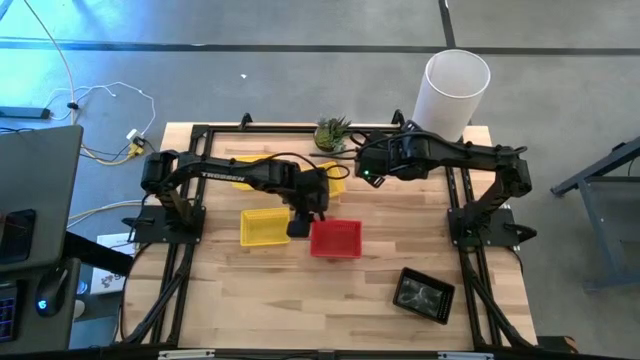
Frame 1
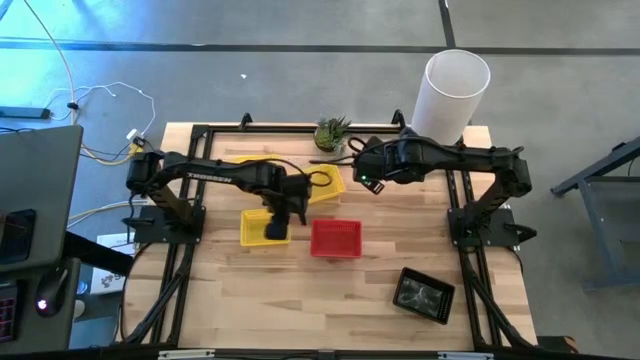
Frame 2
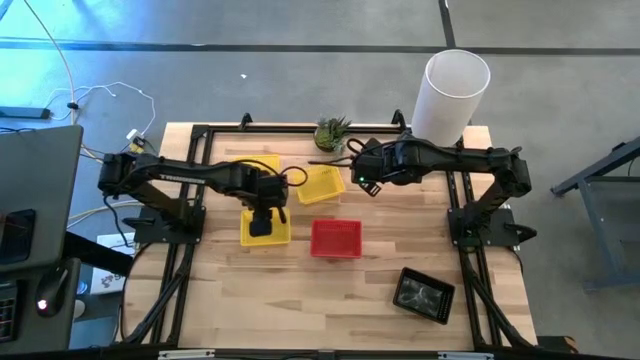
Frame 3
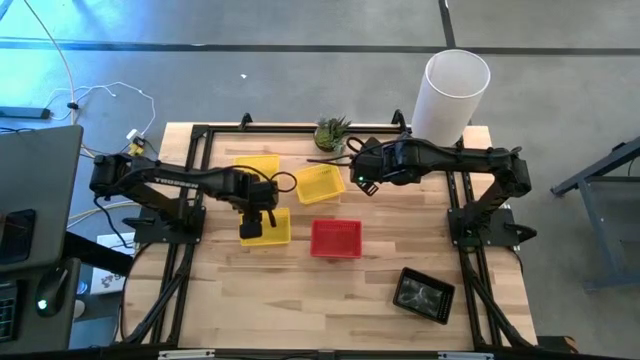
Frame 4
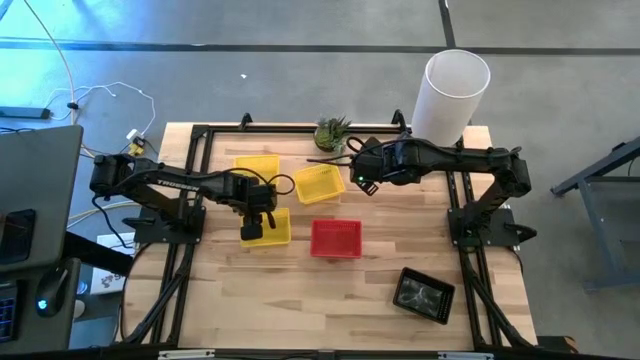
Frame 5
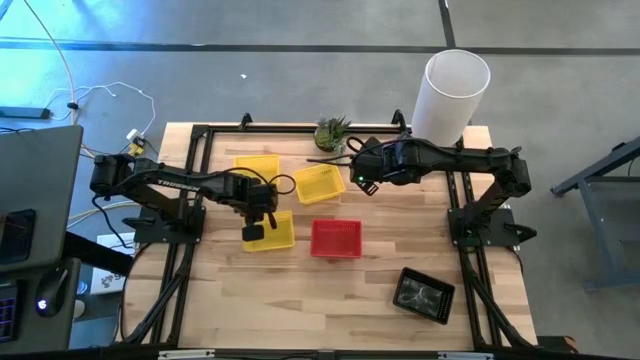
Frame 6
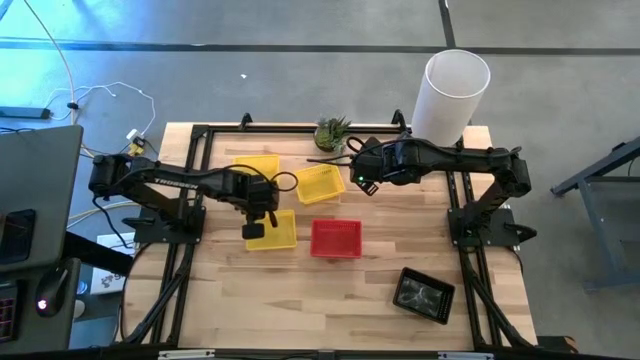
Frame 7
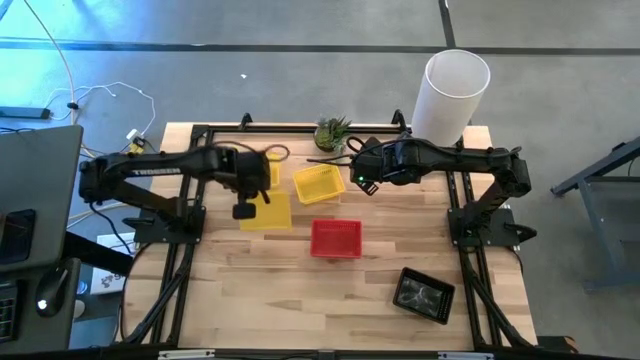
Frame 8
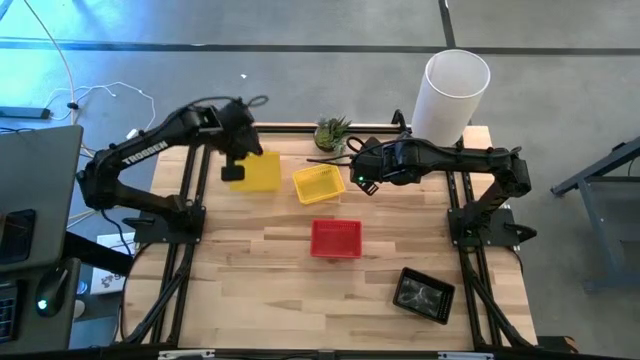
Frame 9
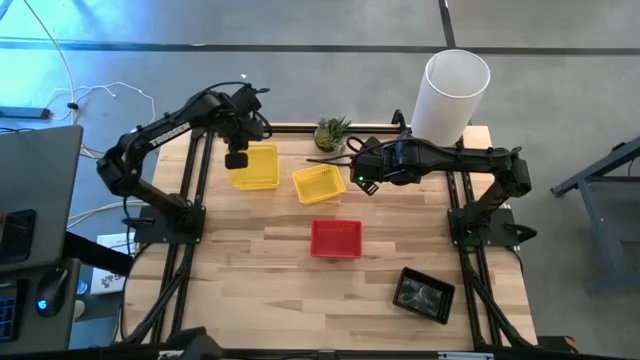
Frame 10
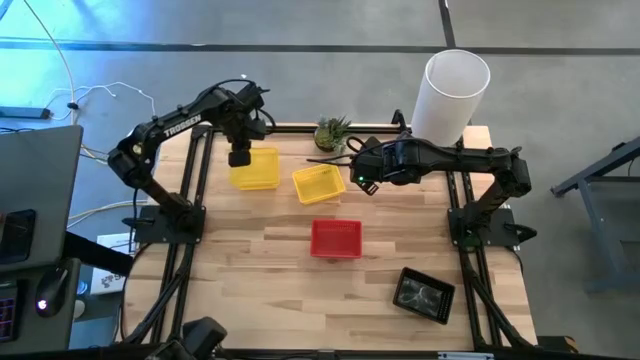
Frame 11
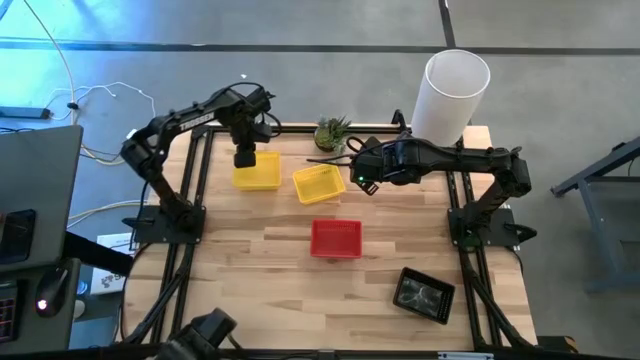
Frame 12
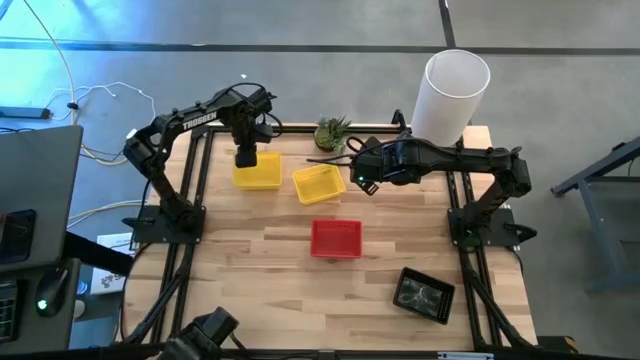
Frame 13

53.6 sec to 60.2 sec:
Stack the bottom yellow bin on top of the top left yellow bin

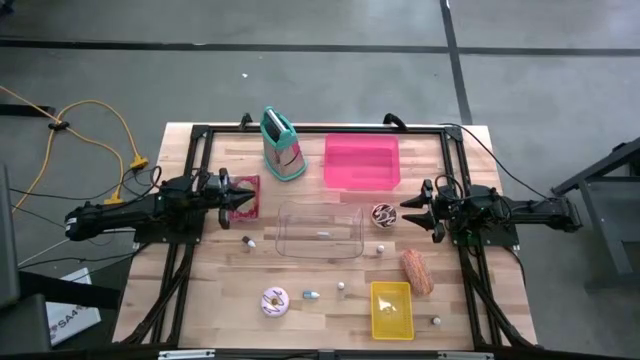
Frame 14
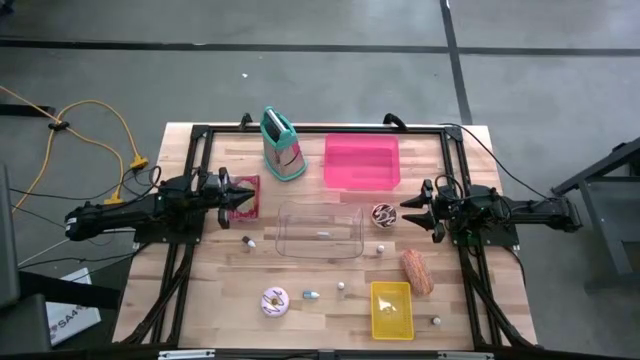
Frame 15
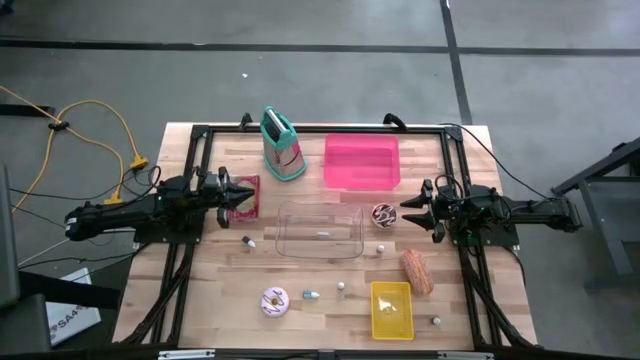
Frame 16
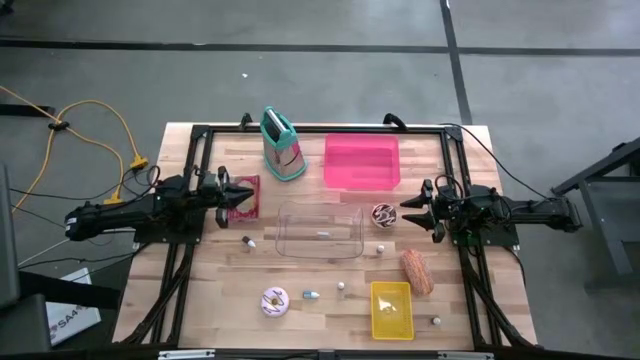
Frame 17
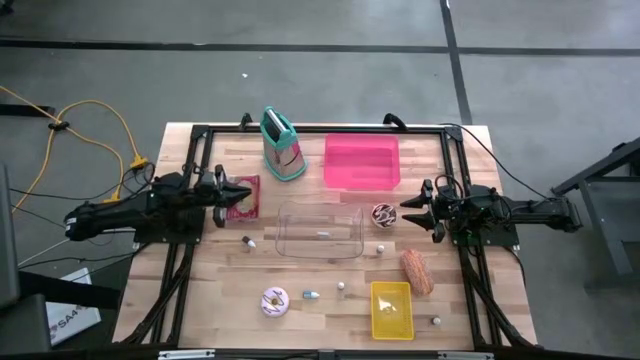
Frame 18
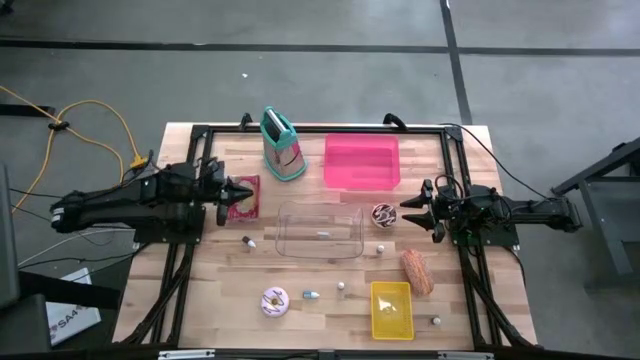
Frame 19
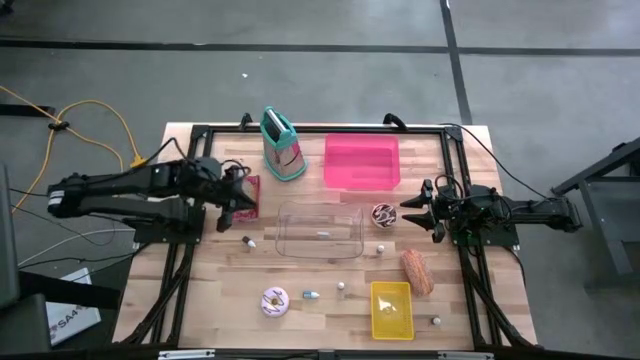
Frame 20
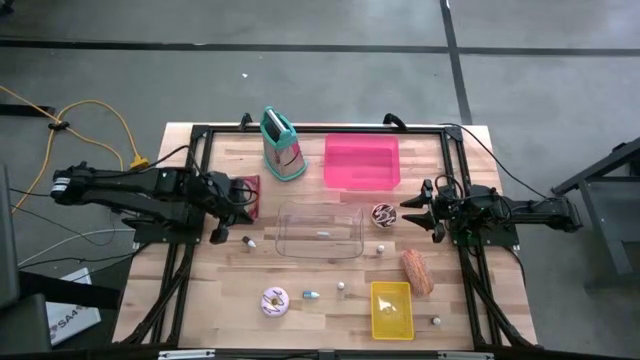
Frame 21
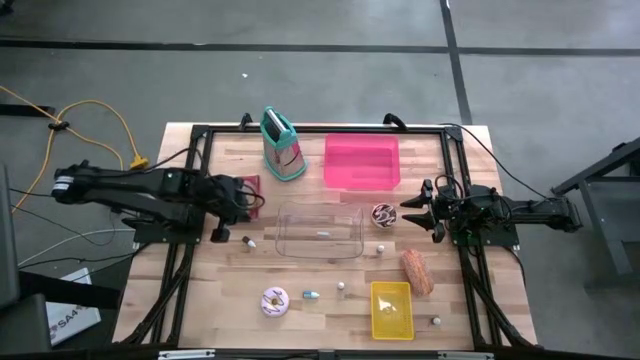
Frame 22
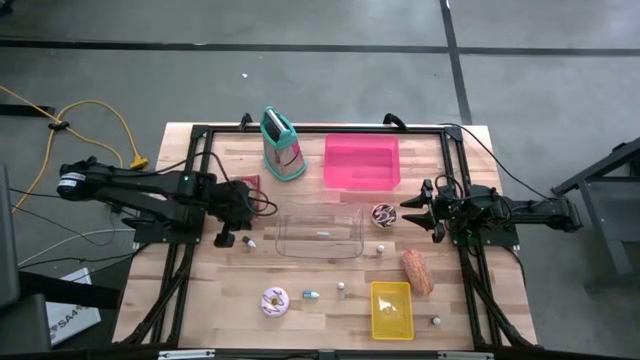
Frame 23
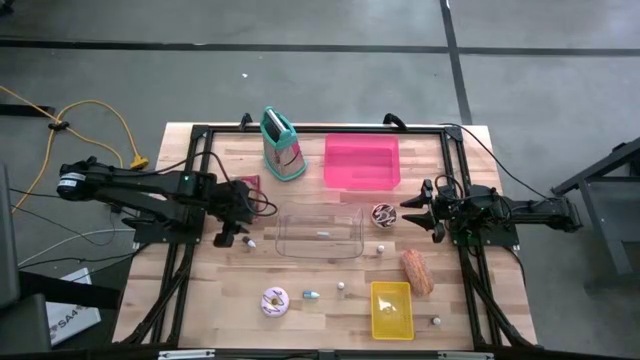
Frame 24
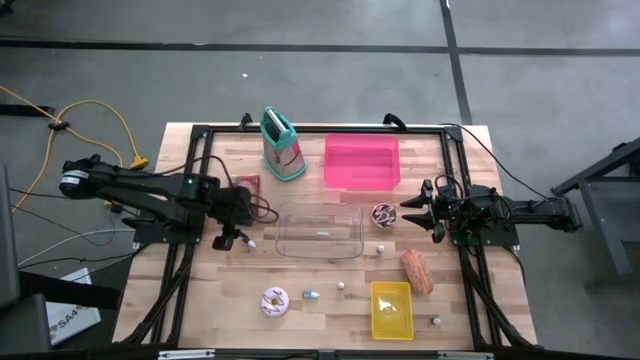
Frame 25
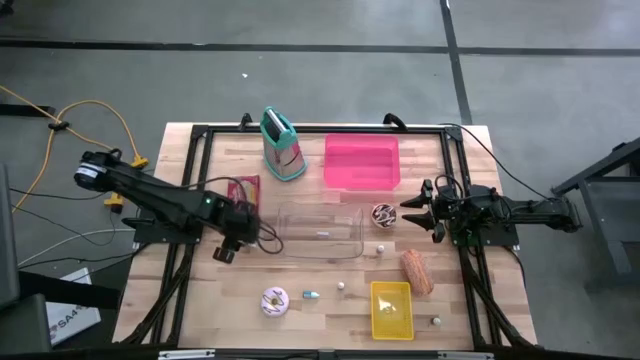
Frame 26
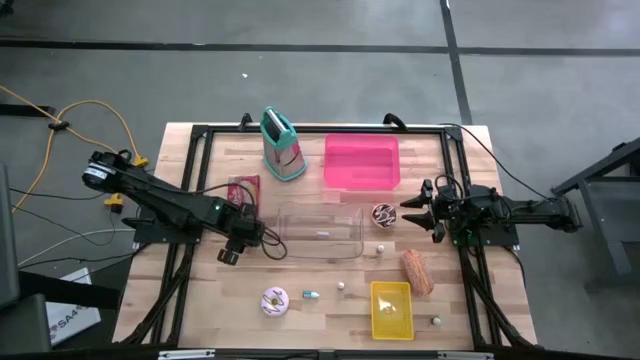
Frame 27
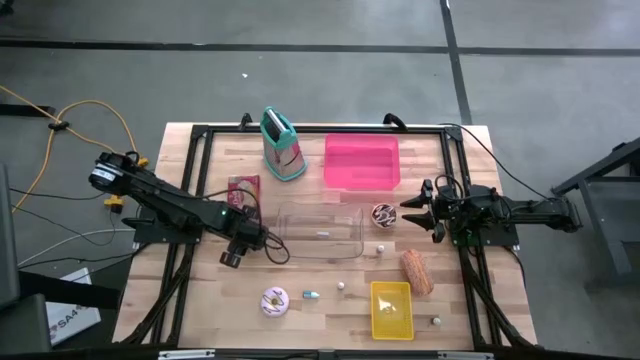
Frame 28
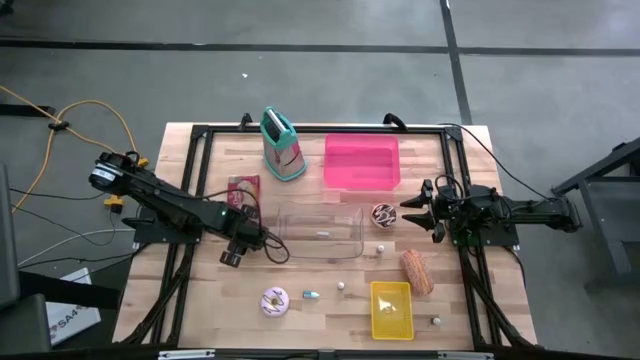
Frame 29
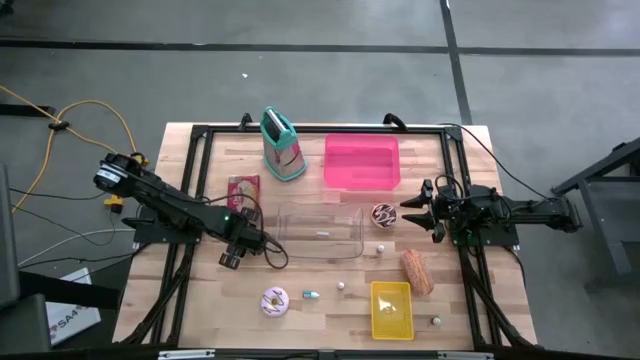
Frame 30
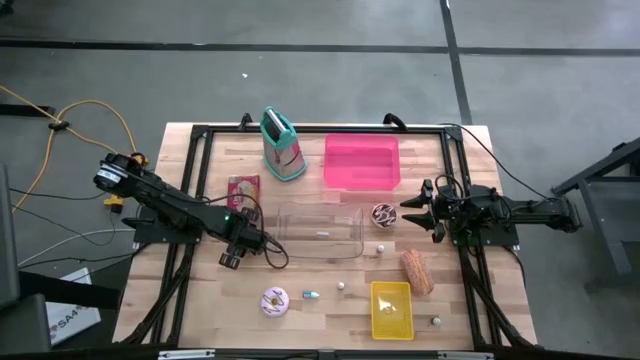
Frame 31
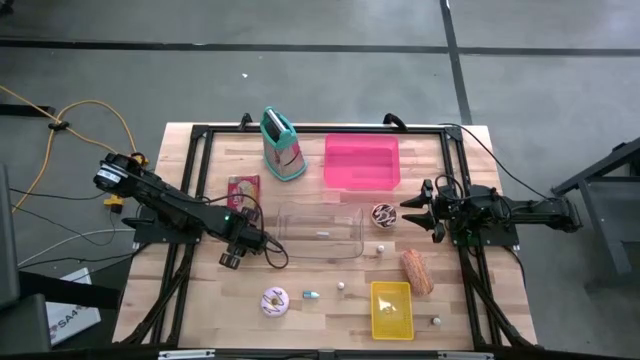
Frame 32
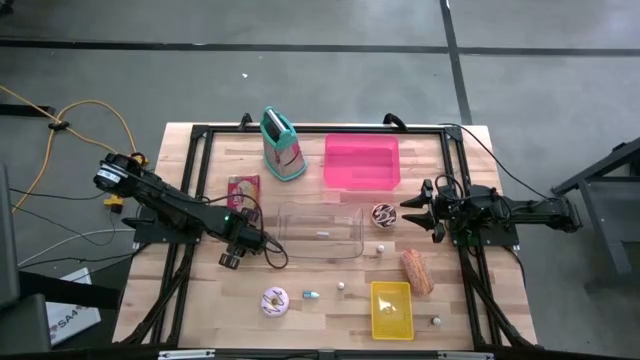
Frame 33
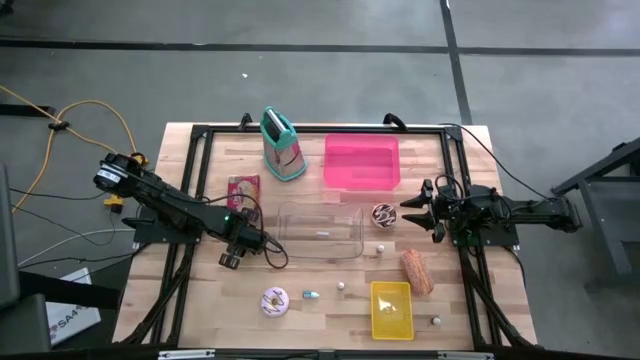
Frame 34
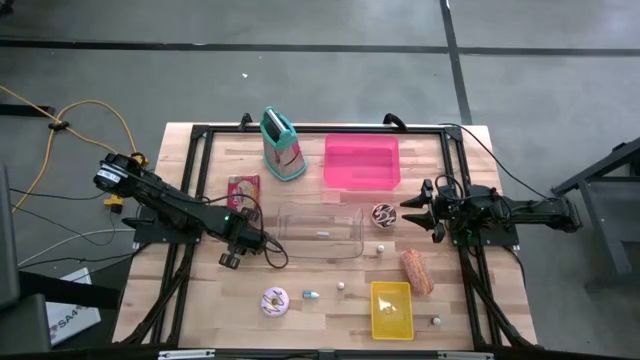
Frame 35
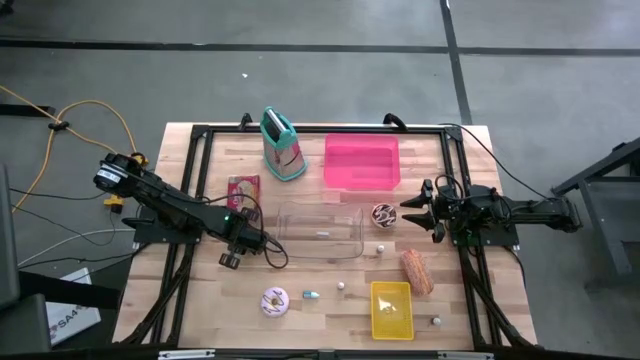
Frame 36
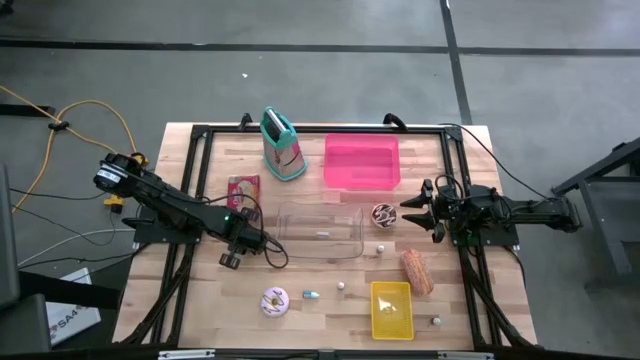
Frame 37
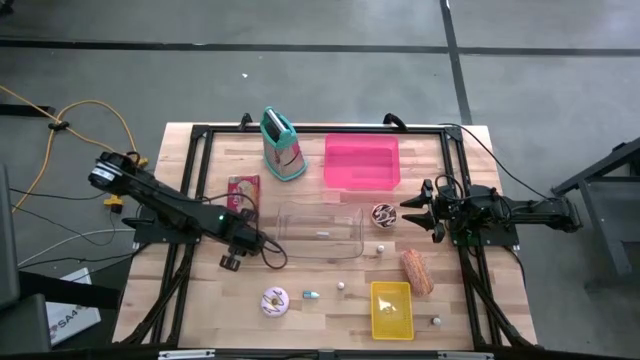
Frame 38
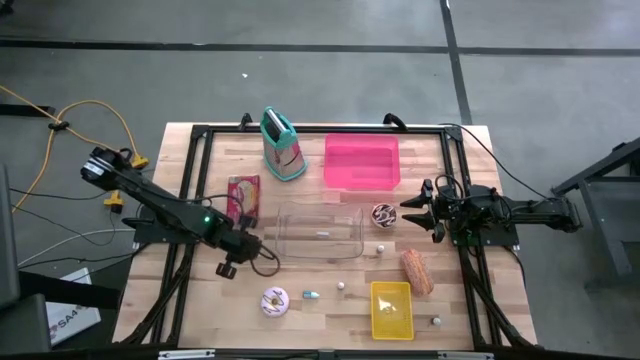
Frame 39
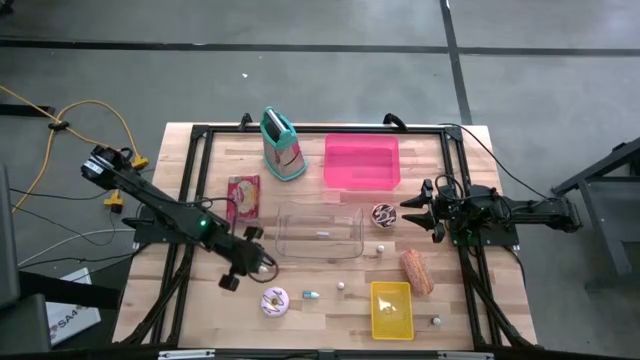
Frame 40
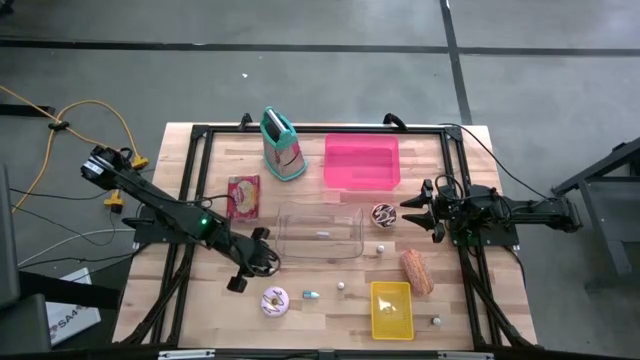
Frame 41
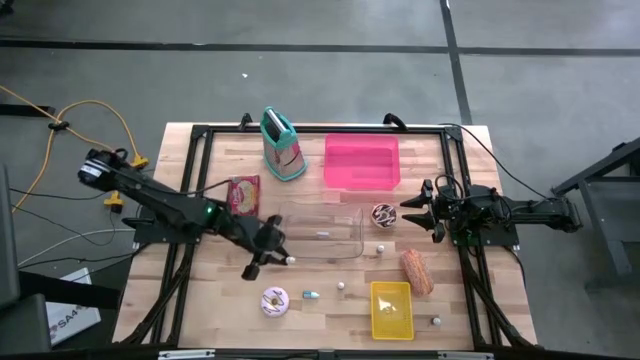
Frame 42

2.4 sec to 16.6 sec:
Put the top black food coloring bottle into the yellow bin
